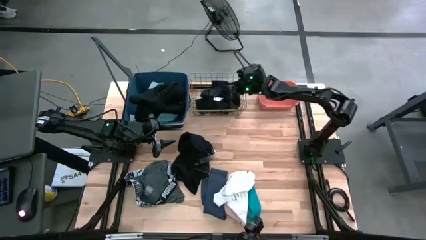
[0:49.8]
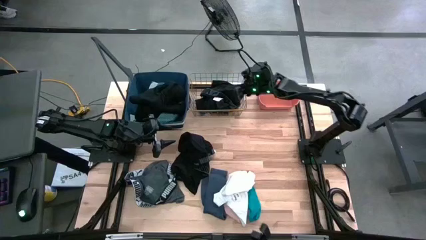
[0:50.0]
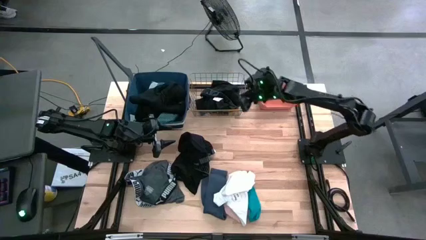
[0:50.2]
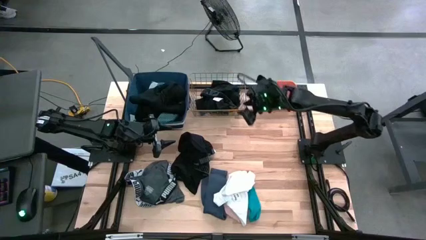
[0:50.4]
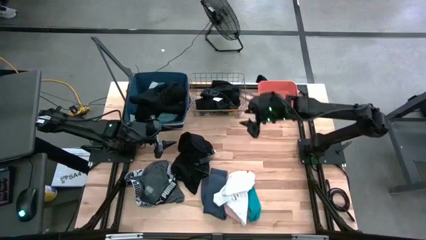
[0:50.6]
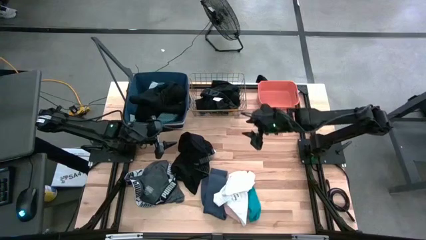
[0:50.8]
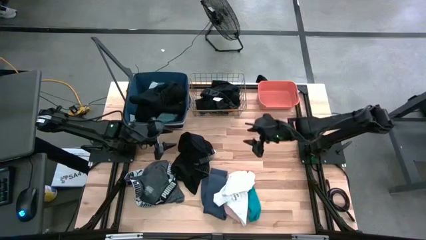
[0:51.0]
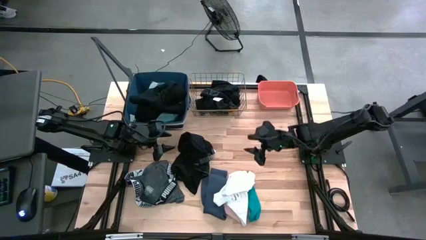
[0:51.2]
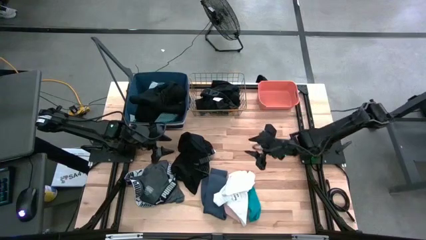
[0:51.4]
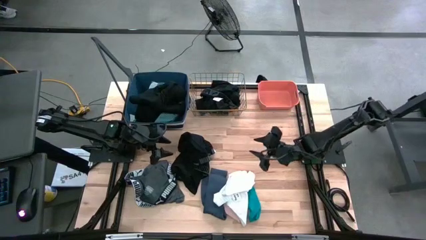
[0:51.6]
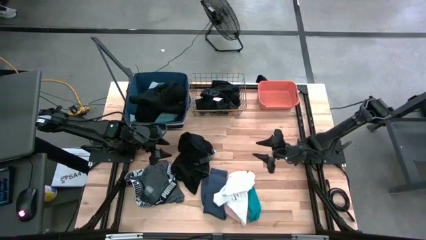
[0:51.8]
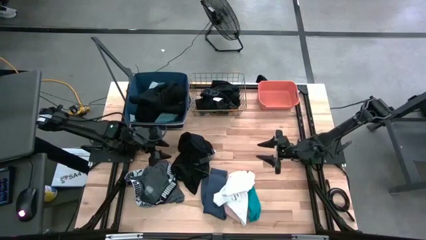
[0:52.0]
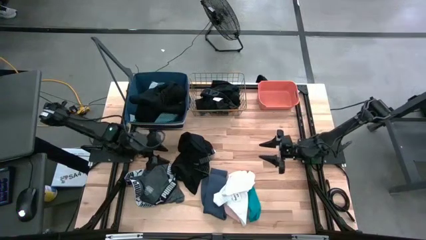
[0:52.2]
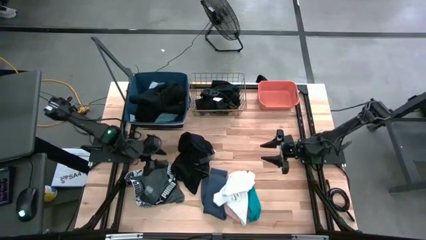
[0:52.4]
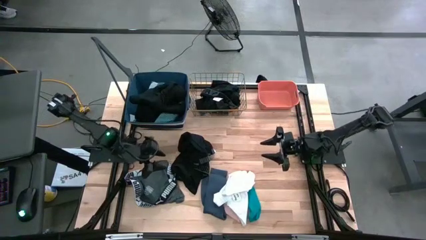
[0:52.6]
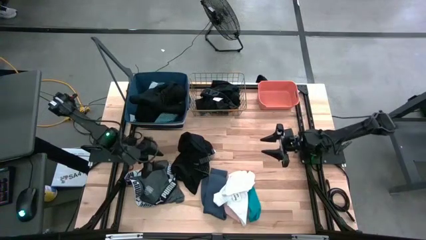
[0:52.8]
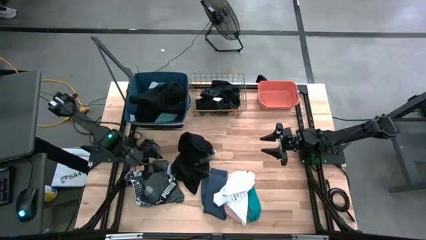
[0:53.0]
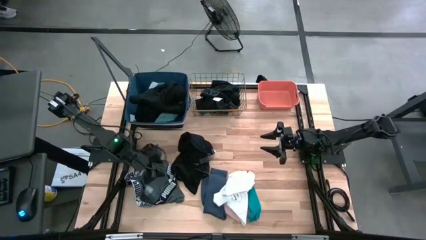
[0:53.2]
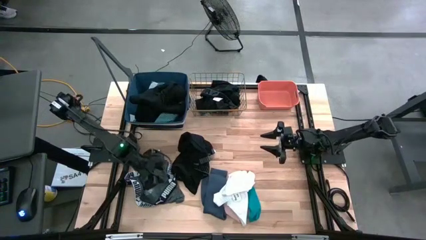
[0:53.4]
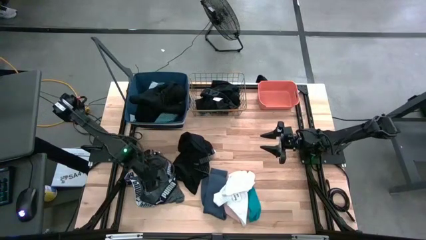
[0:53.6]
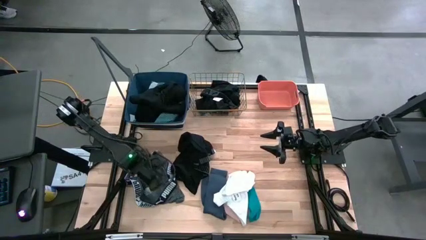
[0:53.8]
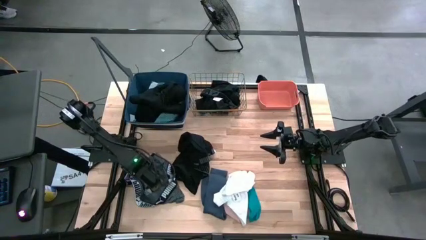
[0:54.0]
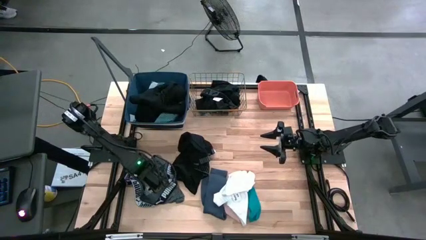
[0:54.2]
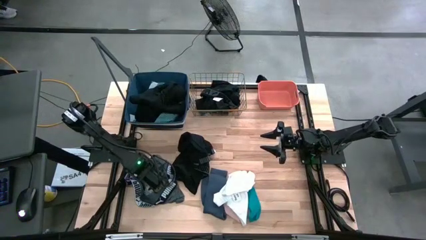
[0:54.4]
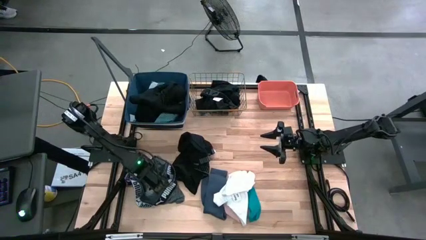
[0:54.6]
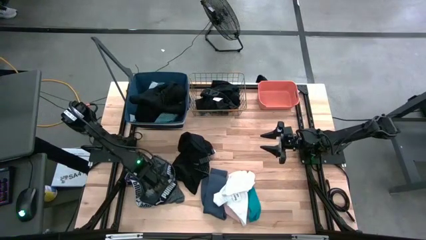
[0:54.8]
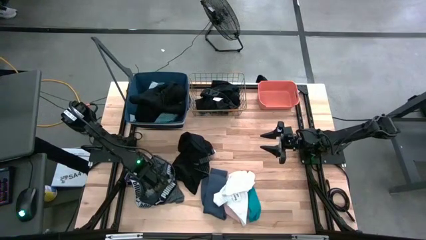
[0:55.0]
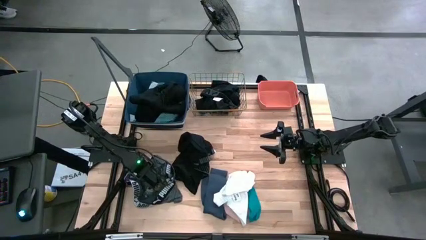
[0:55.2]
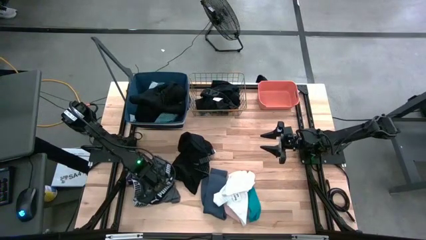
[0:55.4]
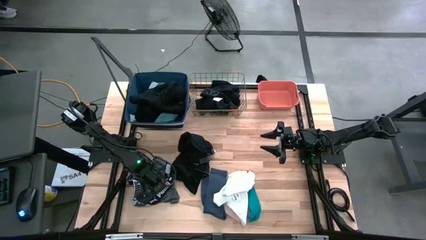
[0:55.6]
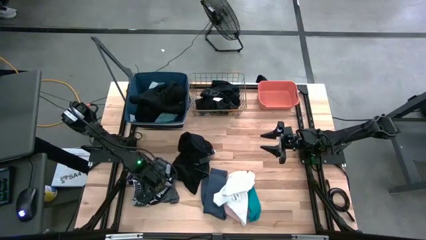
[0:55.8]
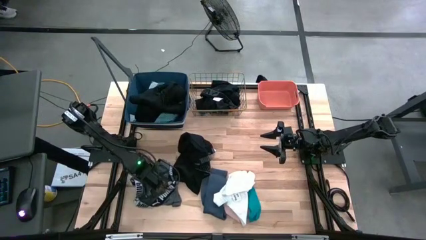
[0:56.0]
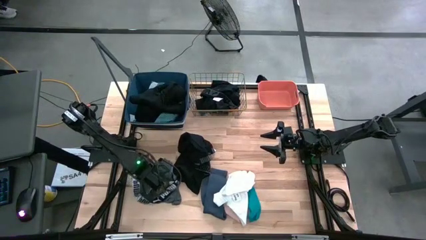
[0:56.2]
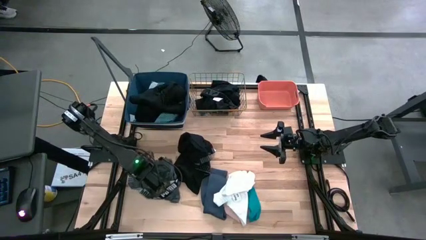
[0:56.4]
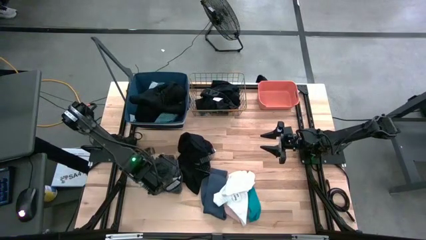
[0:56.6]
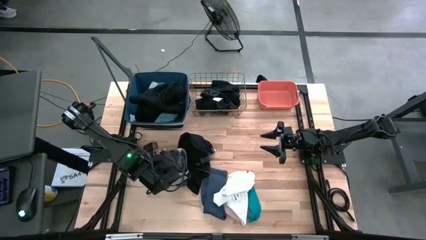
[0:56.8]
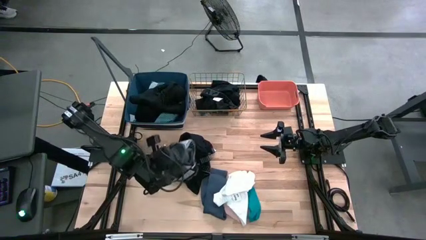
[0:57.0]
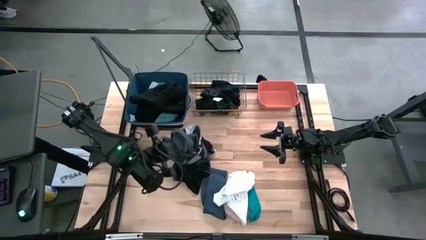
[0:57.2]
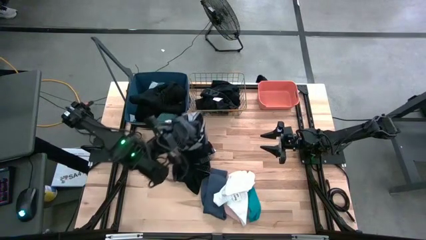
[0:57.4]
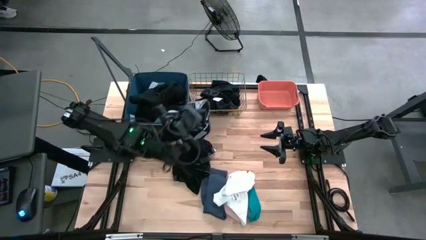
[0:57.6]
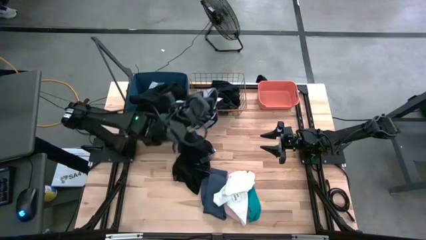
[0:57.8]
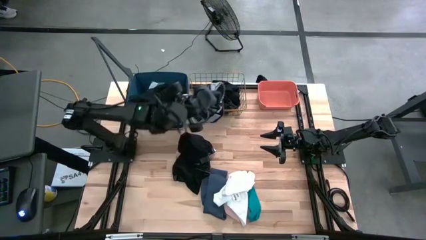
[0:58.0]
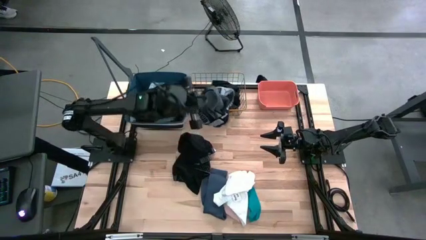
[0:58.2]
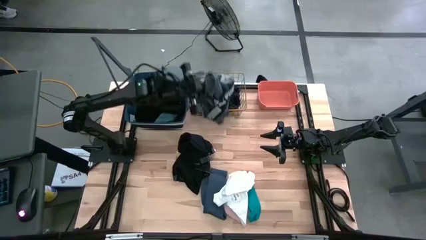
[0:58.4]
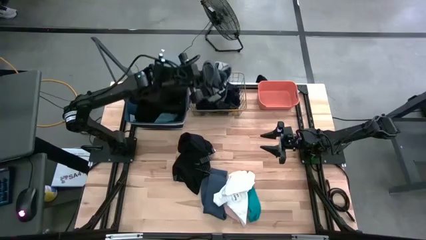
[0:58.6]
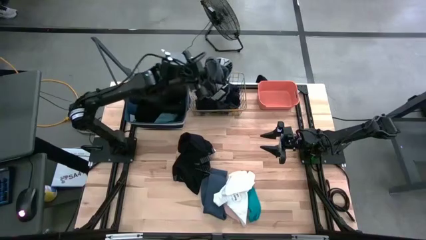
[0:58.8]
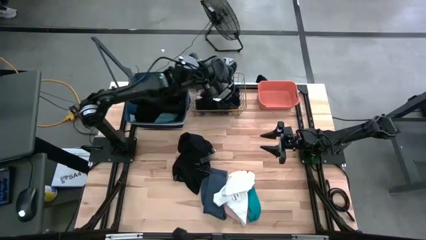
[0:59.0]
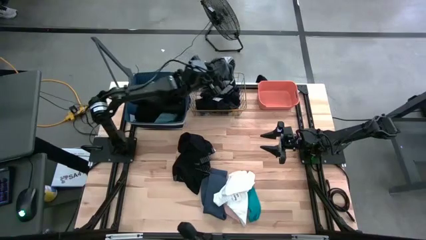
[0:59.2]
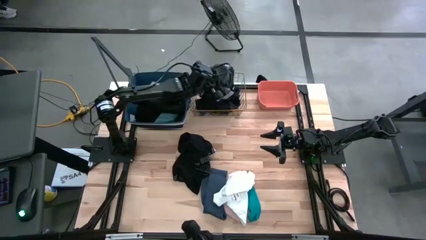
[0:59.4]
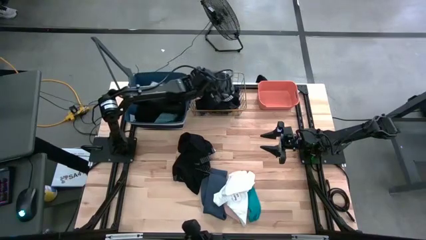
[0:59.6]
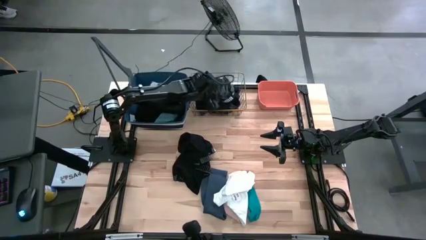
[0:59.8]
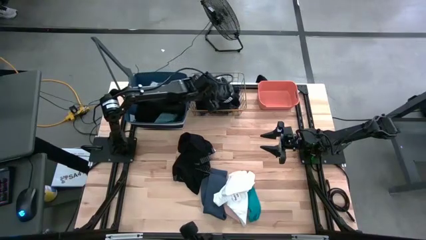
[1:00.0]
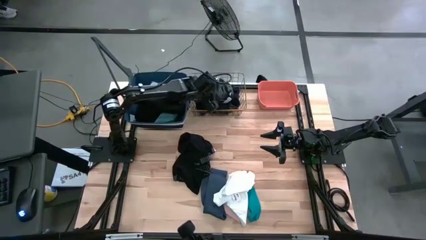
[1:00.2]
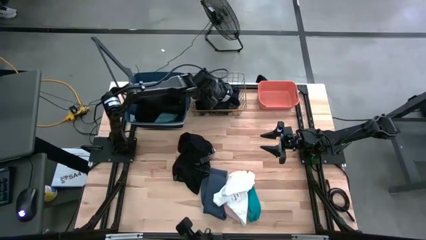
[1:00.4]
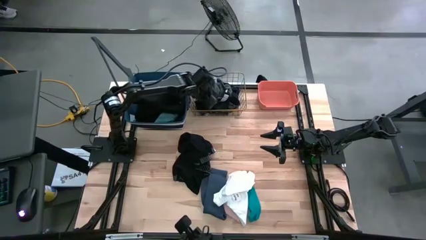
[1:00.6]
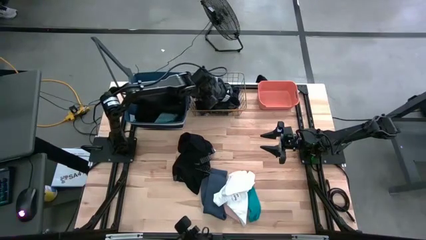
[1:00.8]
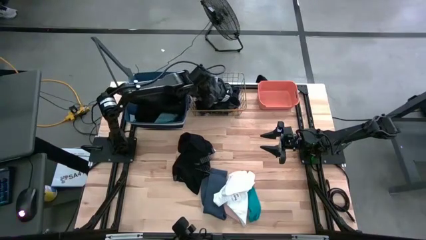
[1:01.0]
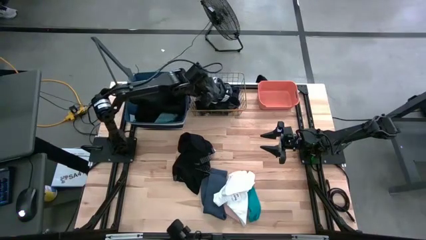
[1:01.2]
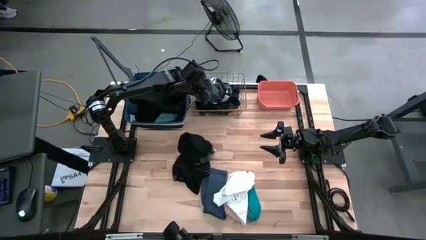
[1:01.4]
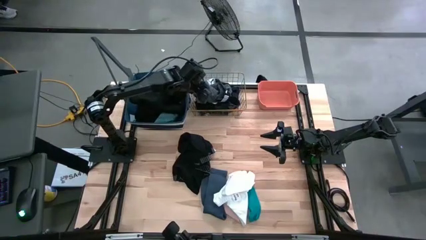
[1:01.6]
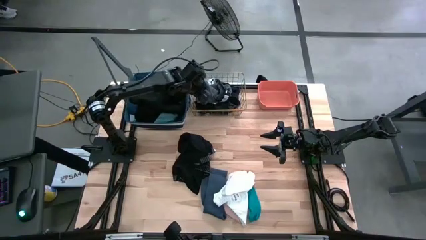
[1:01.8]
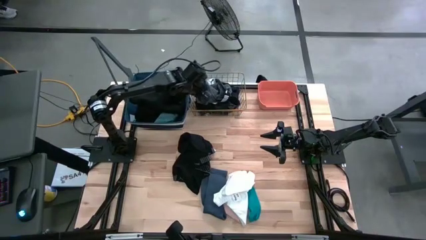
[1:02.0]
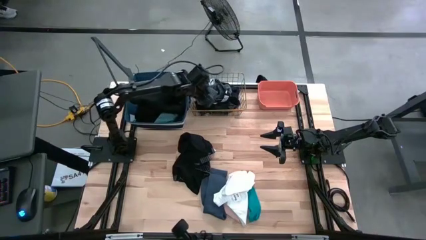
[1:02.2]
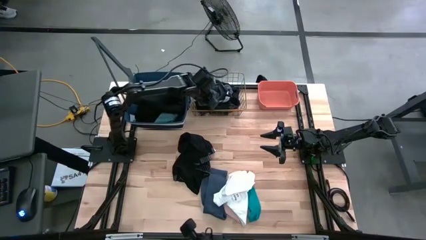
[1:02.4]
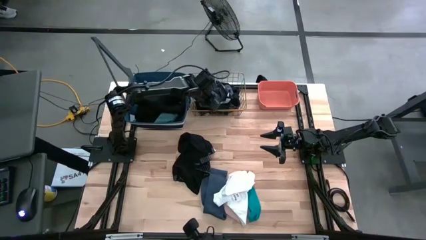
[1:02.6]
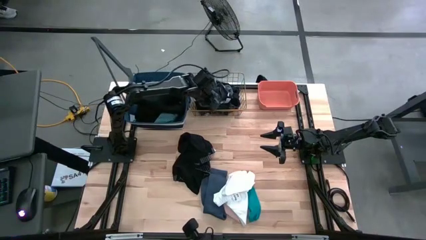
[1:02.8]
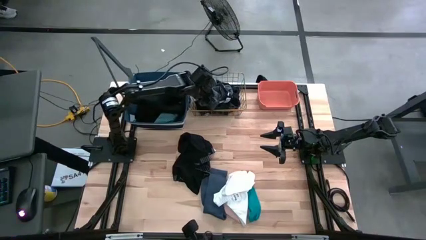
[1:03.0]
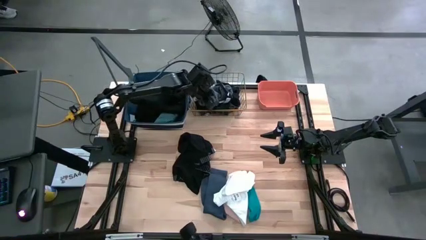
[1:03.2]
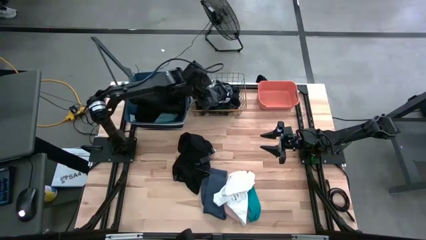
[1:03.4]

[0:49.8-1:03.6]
Task: Pick & Place Cloths
Put the gray underwear into the wire basket
